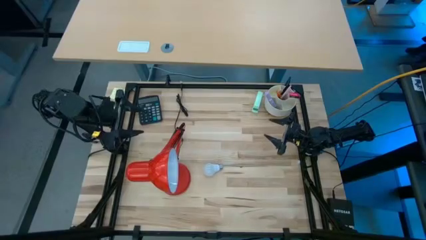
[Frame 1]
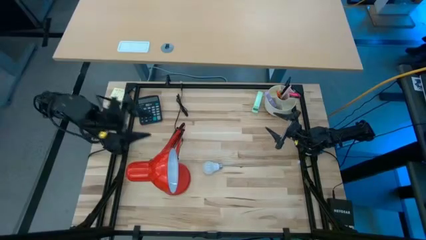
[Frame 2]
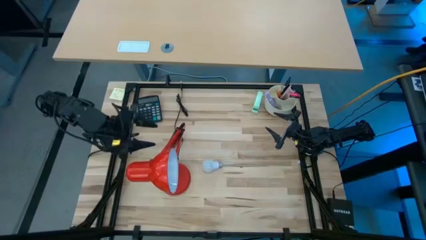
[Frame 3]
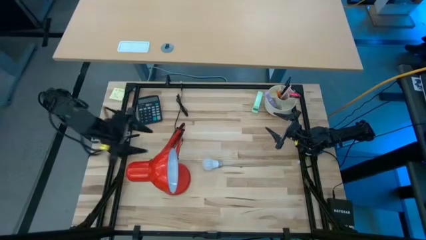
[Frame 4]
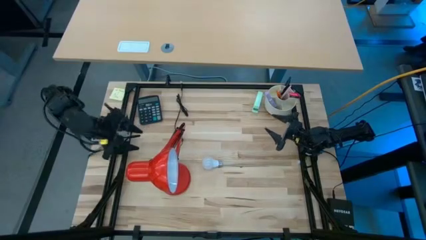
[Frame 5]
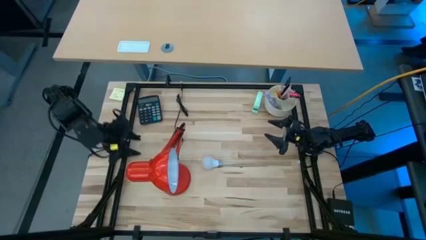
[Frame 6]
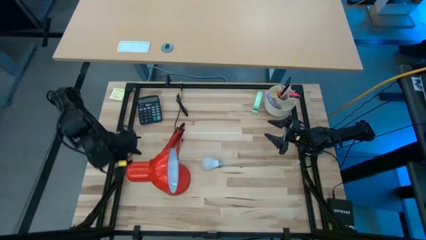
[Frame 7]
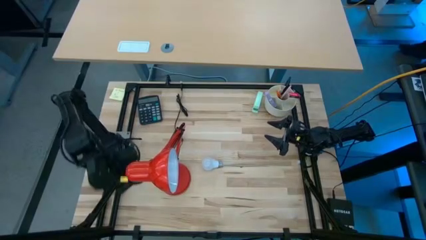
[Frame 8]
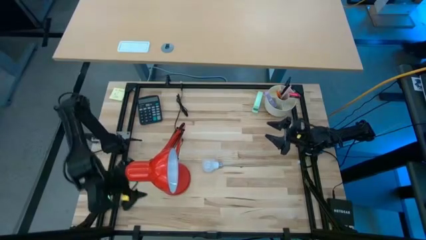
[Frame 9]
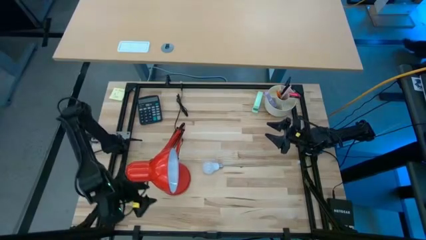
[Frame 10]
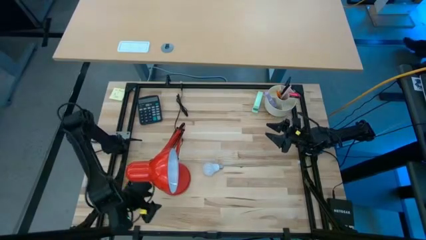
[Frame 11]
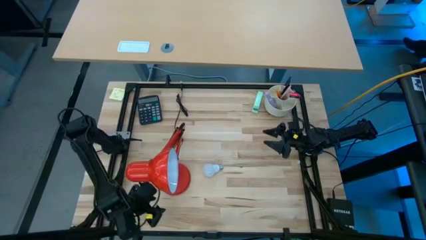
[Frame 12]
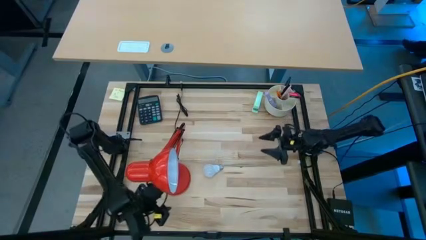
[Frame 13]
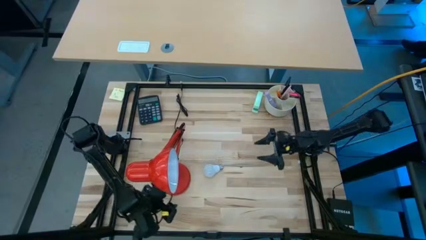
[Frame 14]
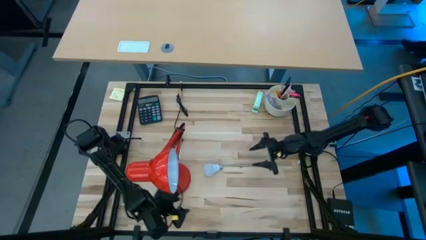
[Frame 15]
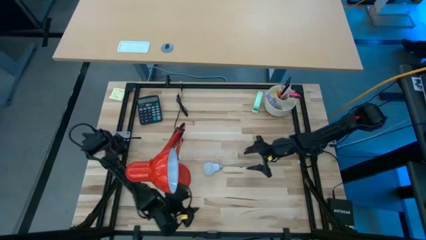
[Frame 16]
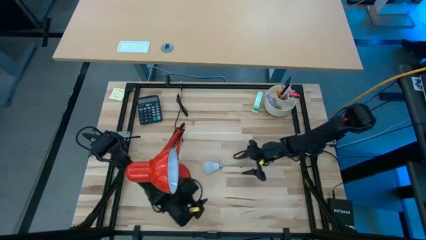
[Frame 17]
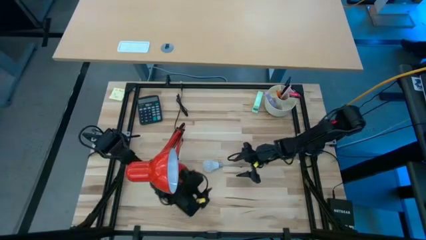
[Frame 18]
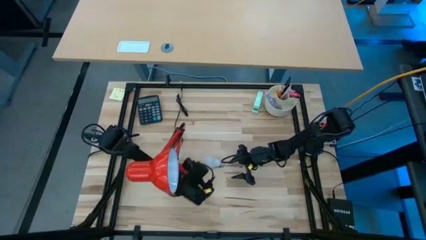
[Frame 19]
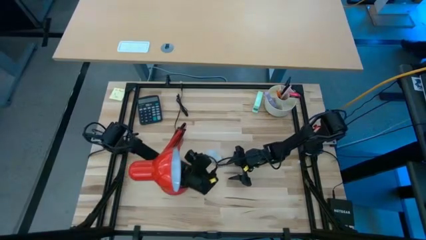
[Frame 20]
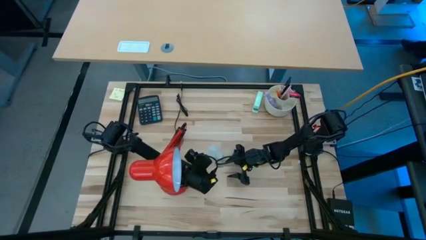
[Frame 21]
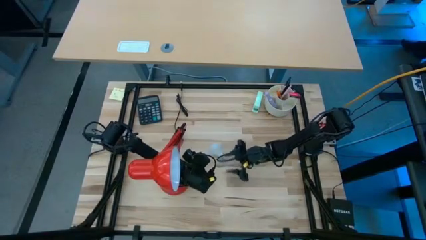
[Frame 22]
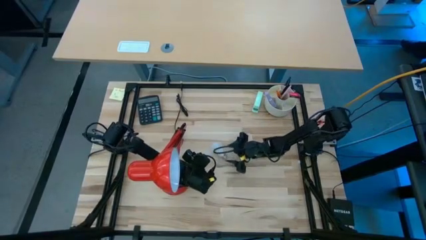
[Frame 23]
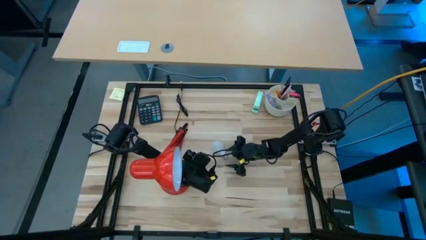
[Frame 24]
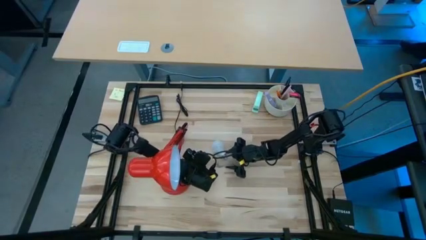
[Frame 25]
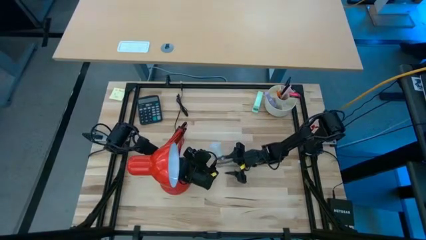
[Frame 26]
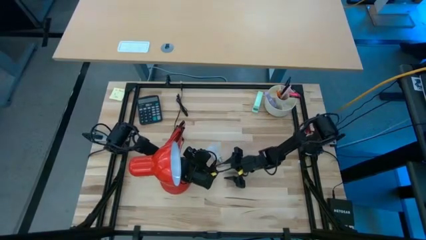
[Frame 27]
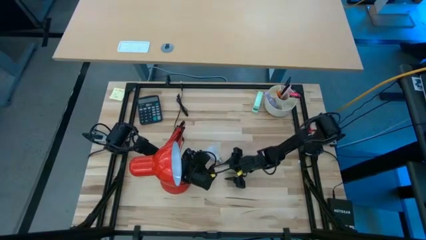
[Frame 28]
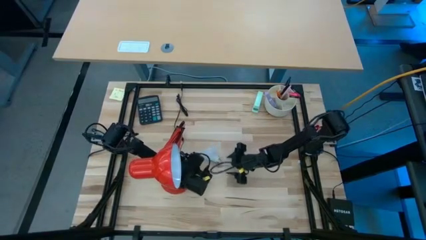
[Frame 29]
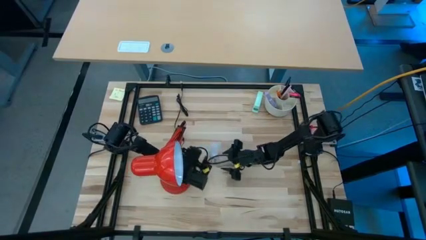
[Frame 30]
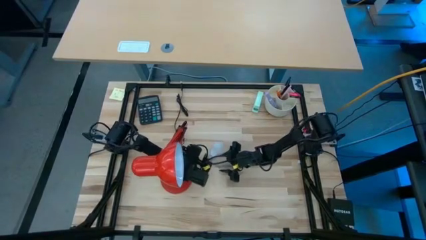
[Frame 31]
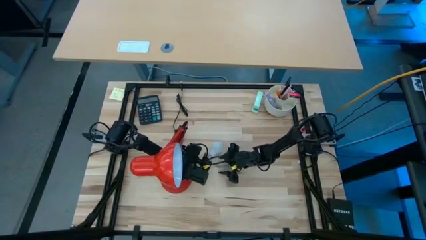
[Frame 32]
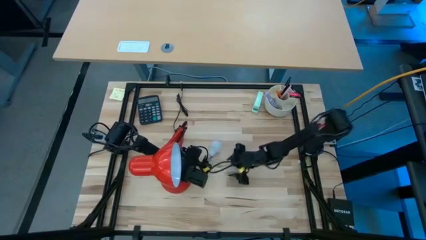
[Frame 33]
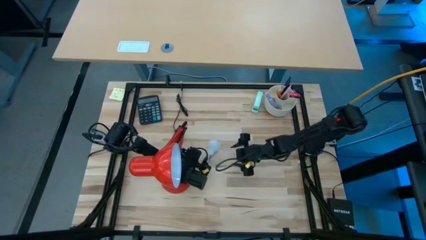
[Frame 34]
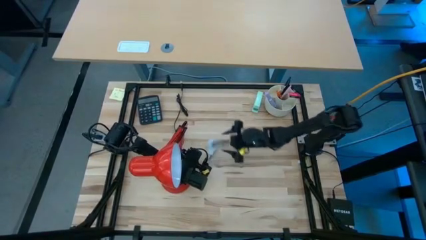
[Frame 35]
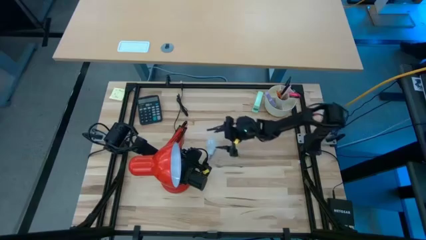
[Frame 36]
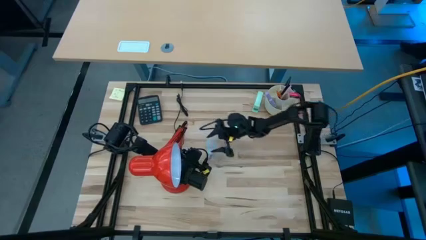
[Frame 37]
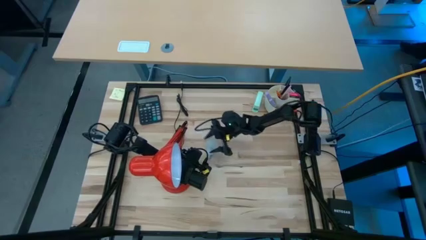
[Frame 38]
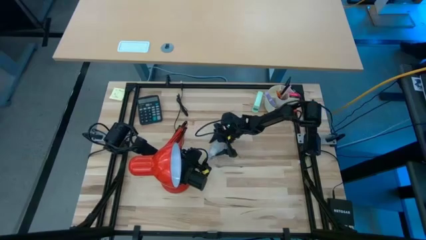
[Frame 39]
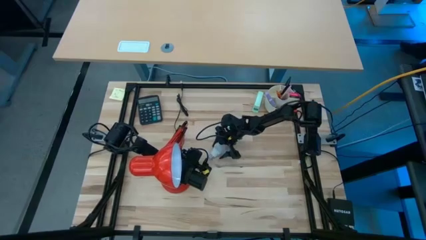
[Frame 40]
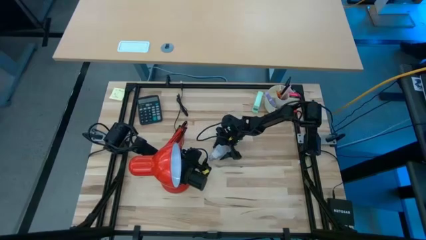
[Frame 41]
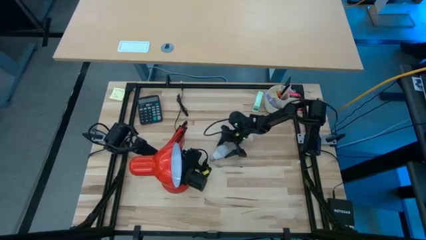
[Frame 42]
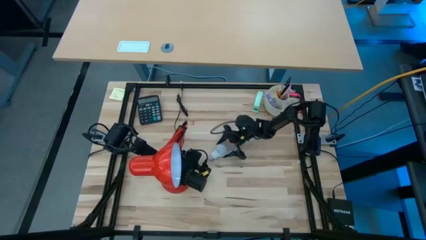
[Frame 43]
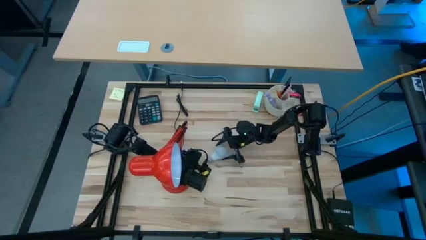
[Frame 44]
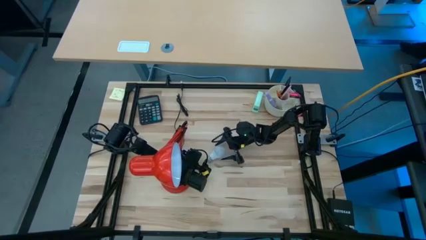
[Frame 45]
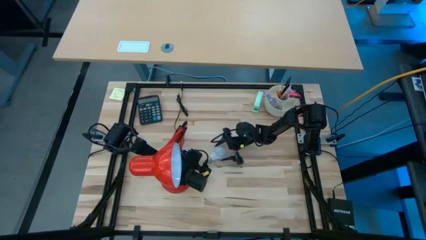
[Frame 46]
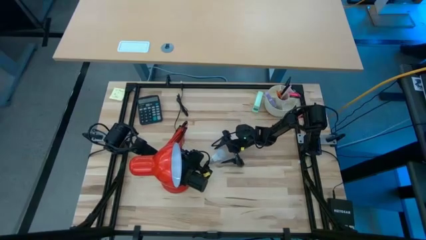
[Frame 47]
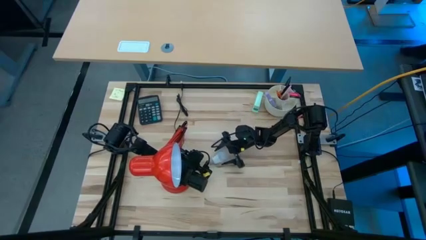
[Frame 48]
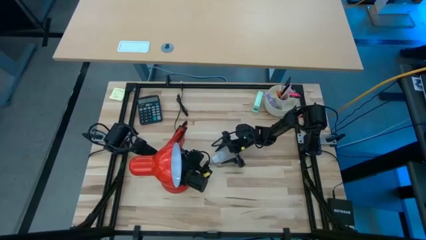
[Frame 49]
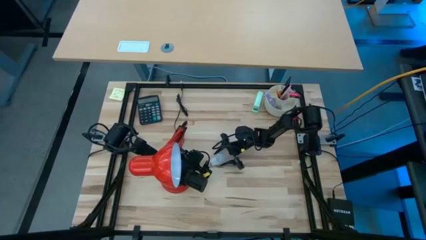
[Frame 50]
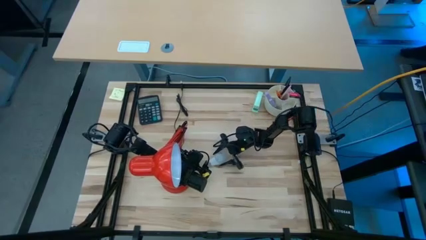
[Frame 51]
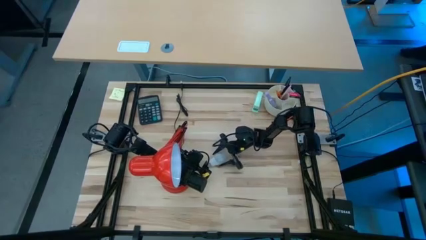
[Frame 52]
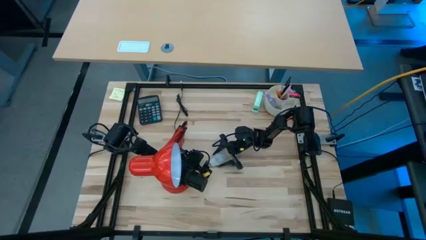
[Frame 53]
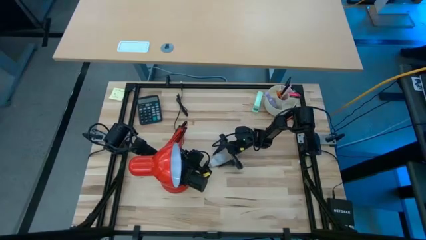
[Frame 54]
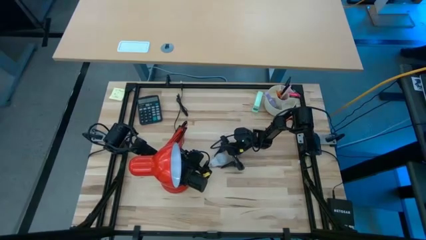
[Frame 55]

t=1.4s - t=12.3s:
Task: Screw lightbulb
Insert the light bulb into the orange desk lamp
